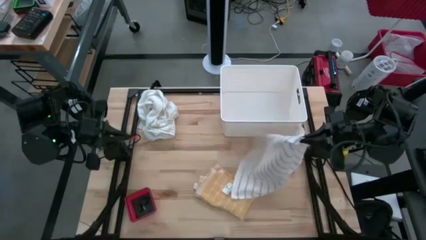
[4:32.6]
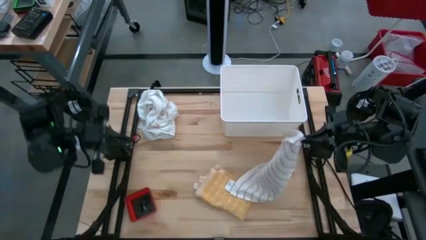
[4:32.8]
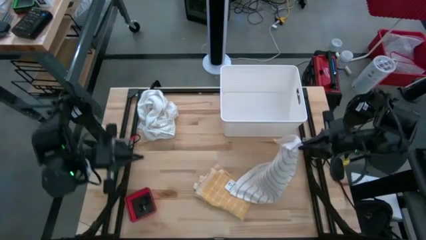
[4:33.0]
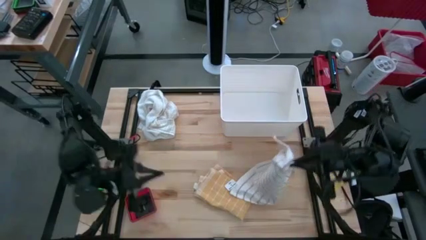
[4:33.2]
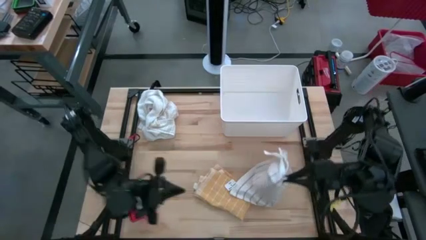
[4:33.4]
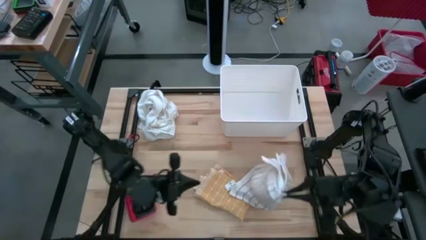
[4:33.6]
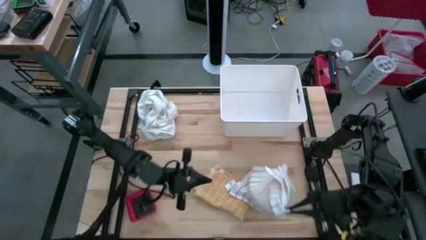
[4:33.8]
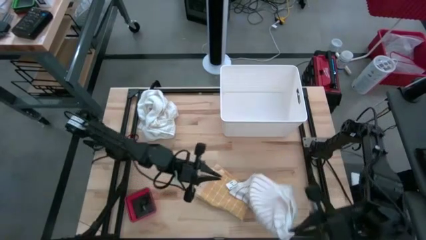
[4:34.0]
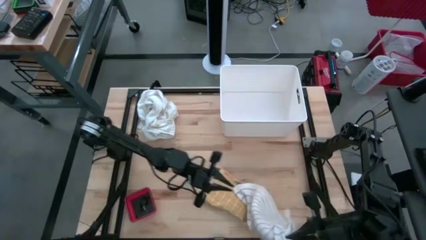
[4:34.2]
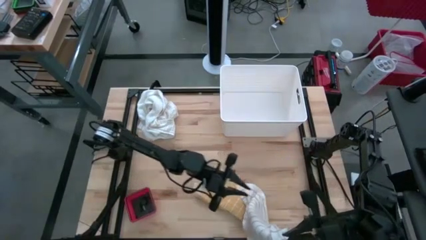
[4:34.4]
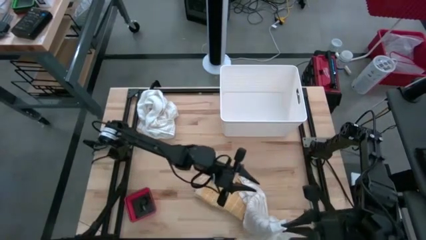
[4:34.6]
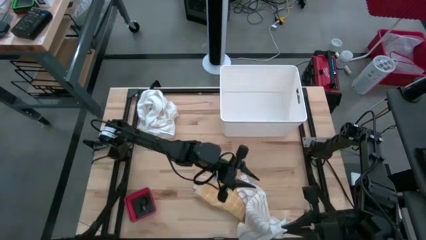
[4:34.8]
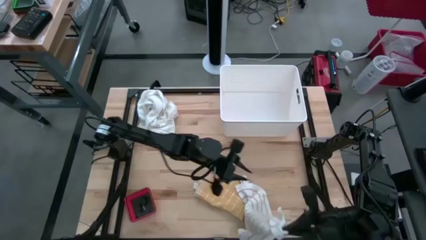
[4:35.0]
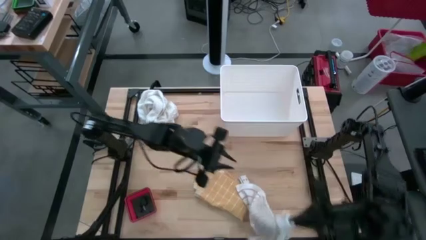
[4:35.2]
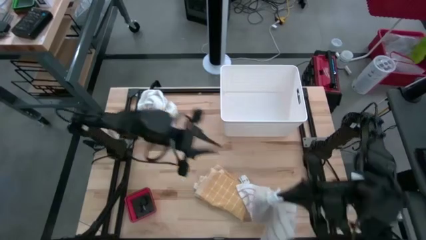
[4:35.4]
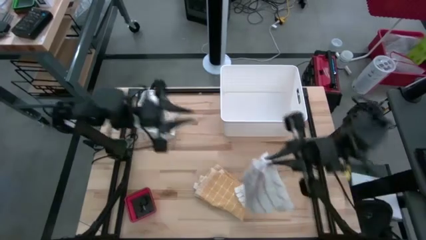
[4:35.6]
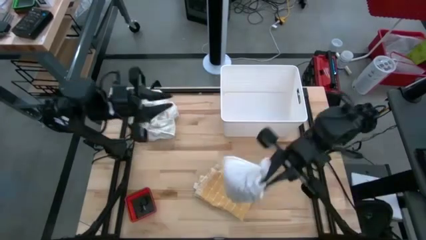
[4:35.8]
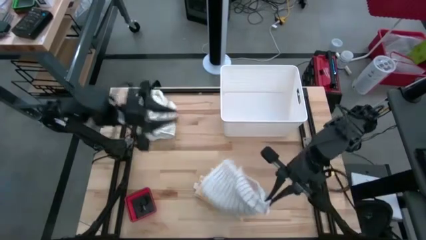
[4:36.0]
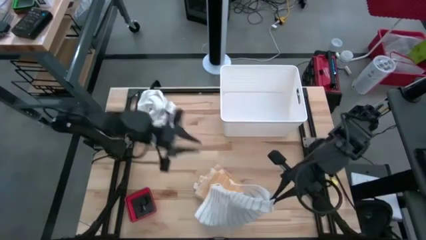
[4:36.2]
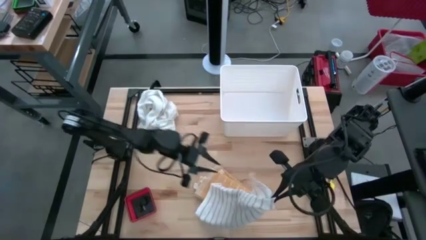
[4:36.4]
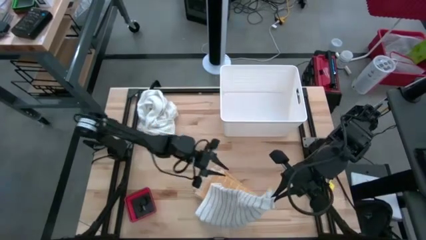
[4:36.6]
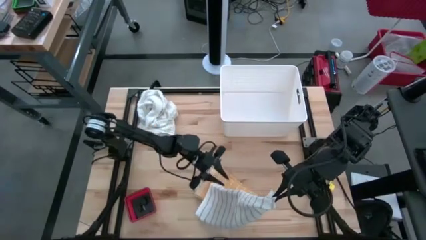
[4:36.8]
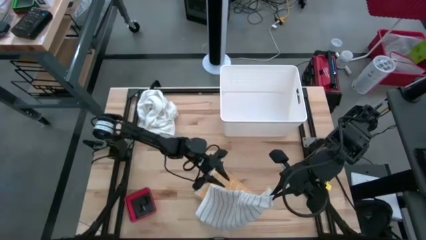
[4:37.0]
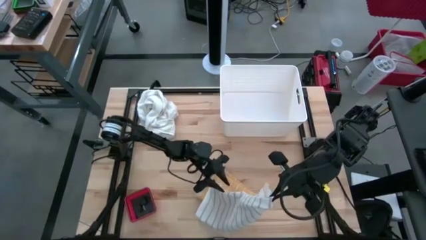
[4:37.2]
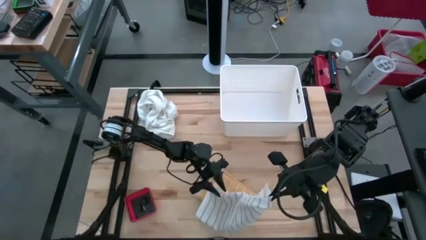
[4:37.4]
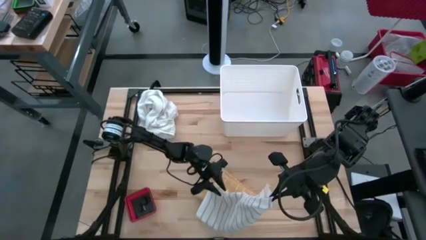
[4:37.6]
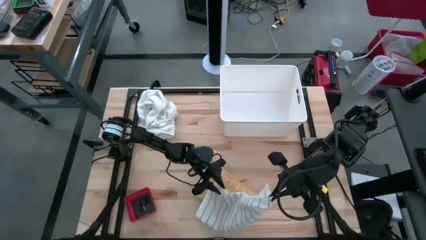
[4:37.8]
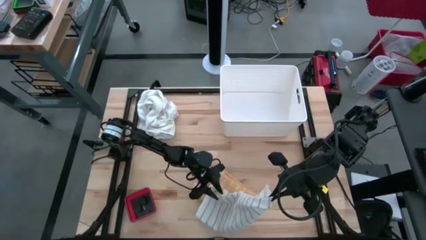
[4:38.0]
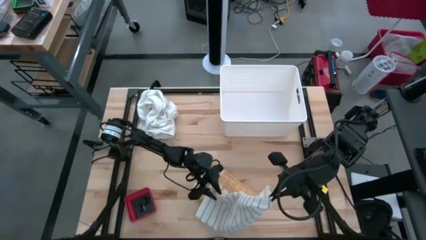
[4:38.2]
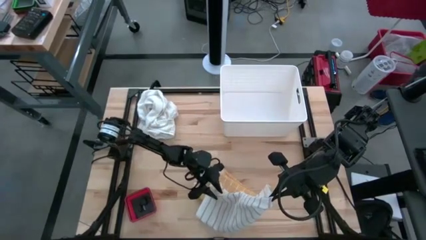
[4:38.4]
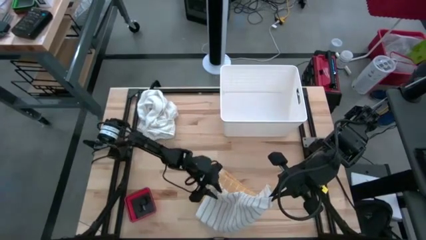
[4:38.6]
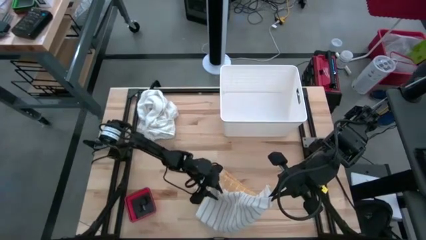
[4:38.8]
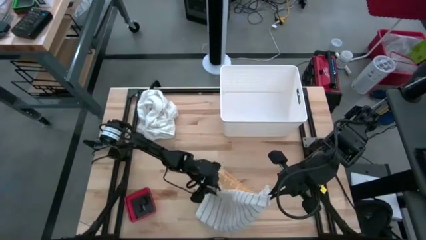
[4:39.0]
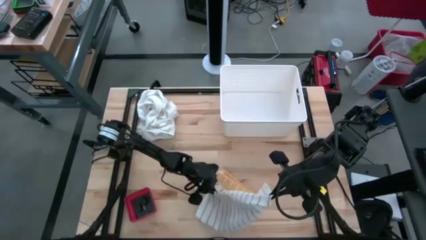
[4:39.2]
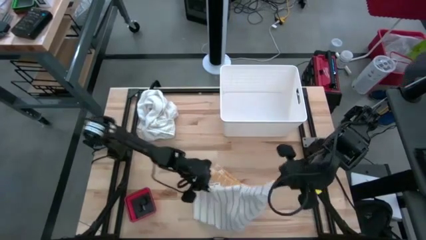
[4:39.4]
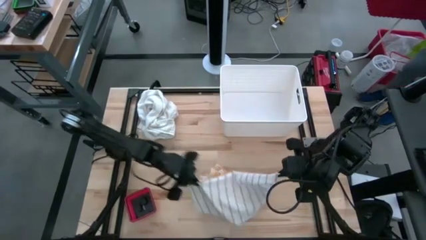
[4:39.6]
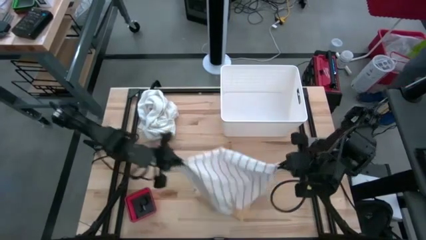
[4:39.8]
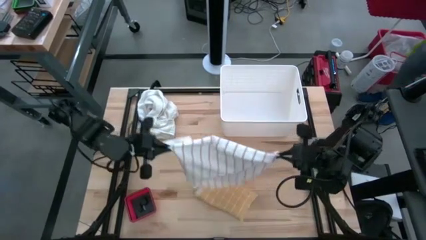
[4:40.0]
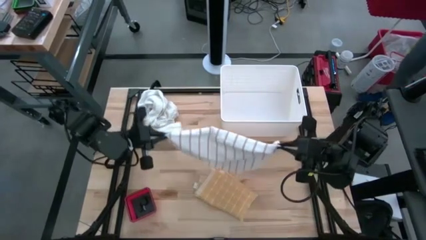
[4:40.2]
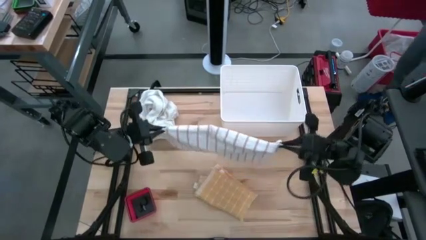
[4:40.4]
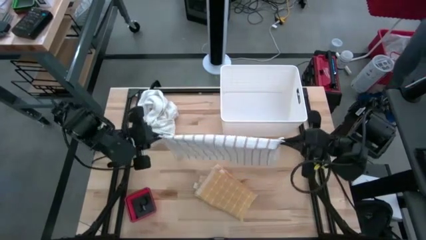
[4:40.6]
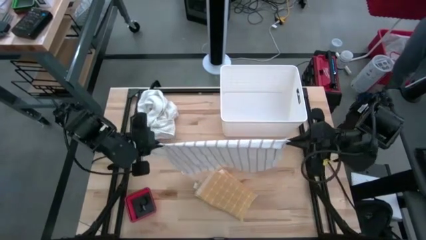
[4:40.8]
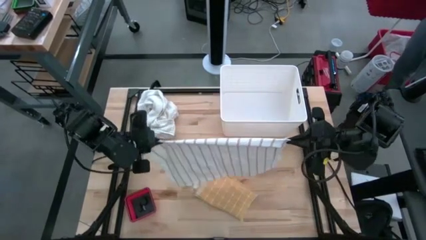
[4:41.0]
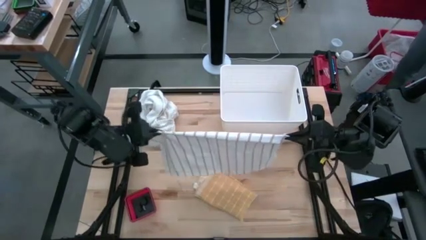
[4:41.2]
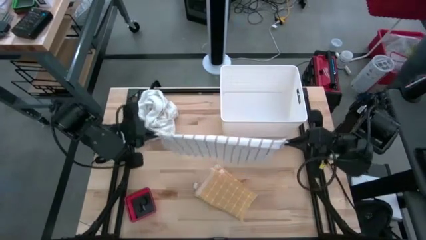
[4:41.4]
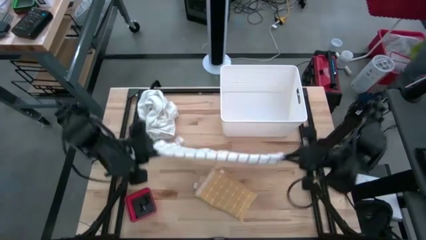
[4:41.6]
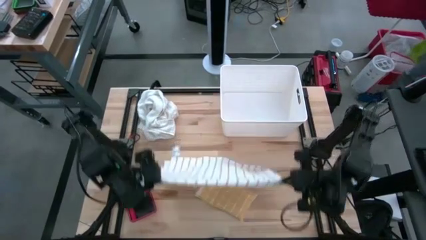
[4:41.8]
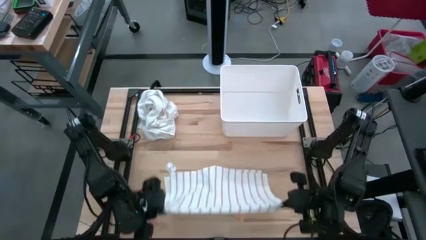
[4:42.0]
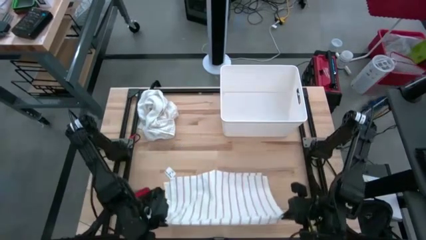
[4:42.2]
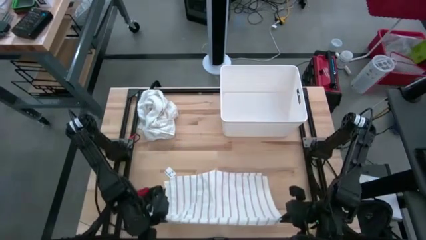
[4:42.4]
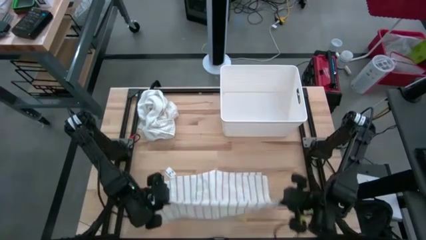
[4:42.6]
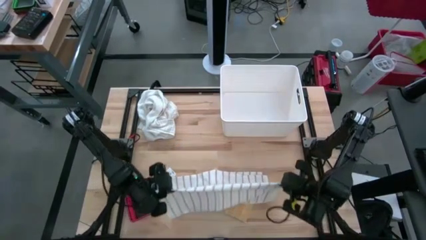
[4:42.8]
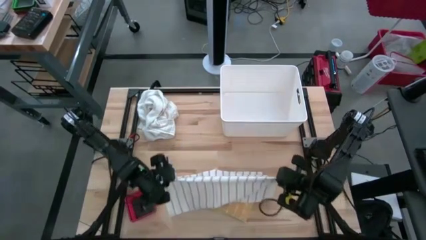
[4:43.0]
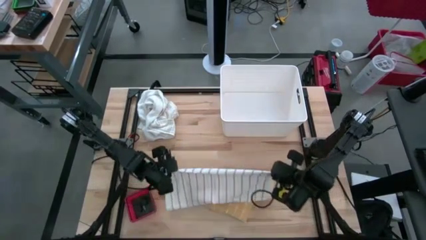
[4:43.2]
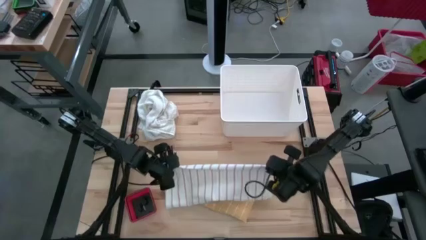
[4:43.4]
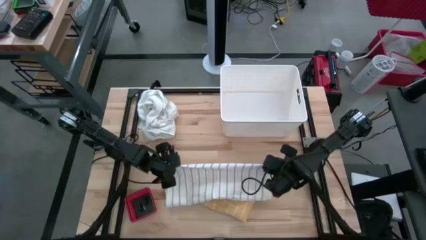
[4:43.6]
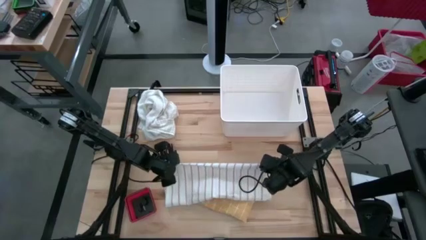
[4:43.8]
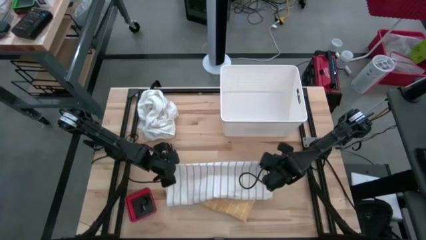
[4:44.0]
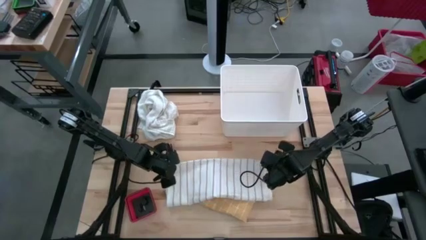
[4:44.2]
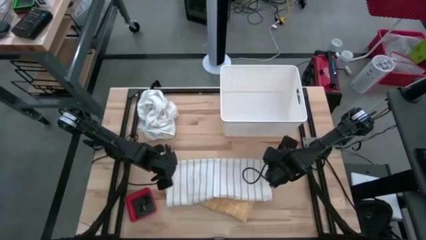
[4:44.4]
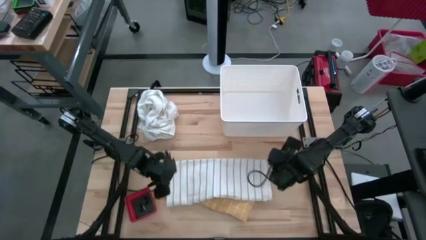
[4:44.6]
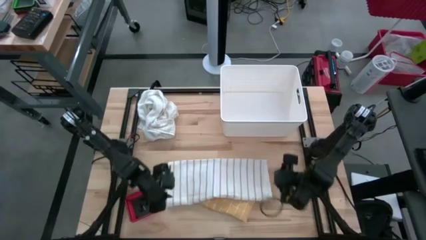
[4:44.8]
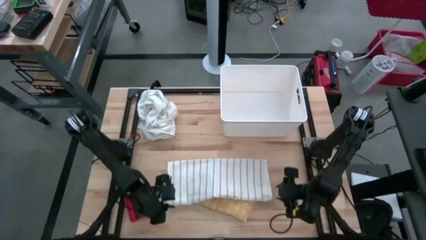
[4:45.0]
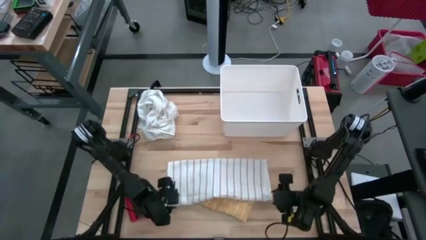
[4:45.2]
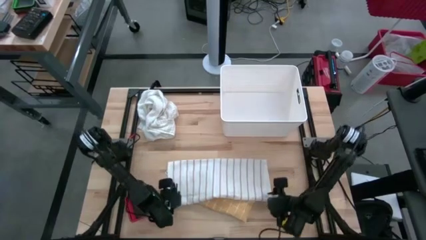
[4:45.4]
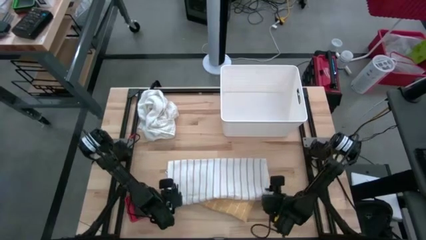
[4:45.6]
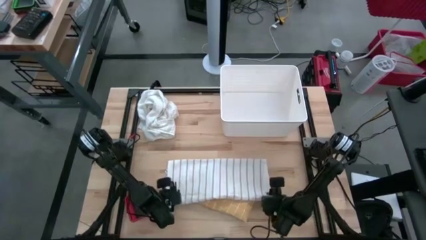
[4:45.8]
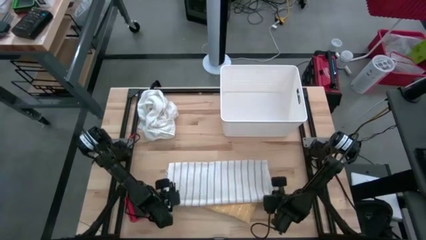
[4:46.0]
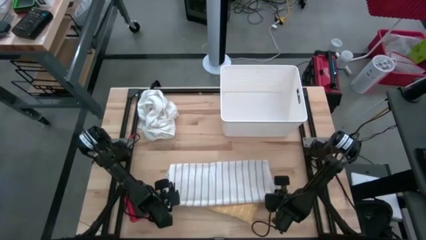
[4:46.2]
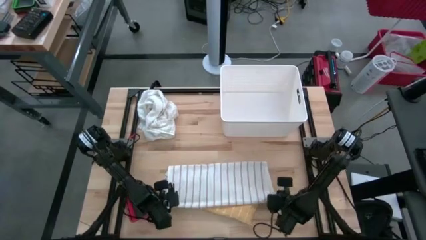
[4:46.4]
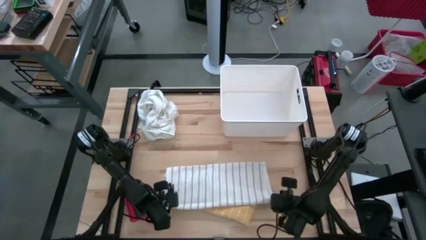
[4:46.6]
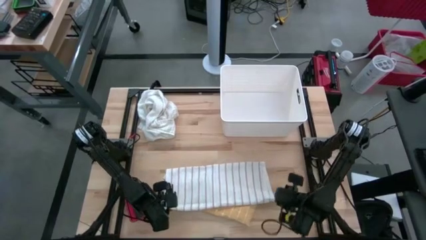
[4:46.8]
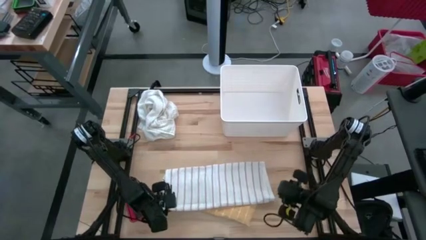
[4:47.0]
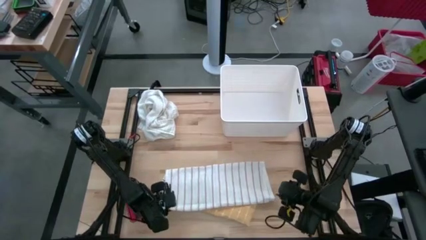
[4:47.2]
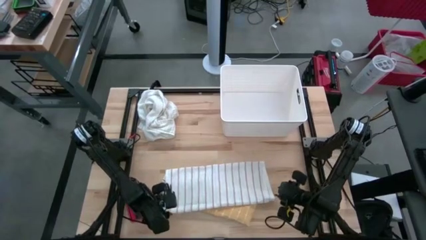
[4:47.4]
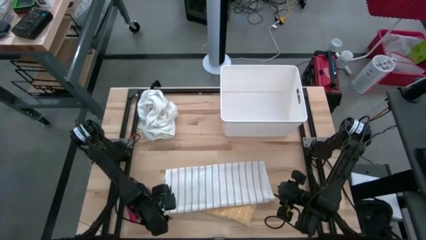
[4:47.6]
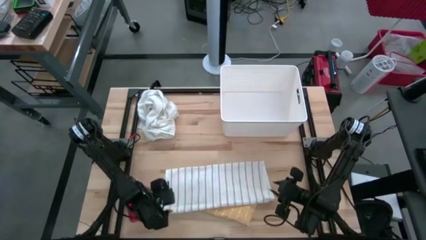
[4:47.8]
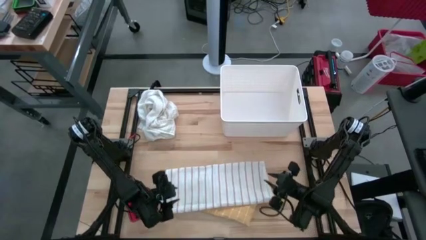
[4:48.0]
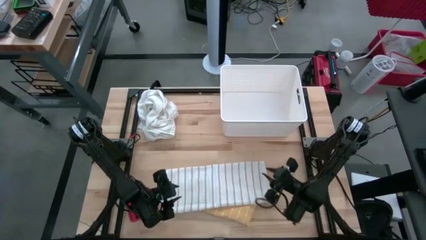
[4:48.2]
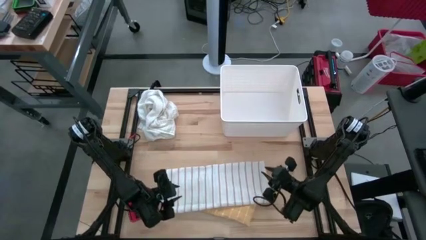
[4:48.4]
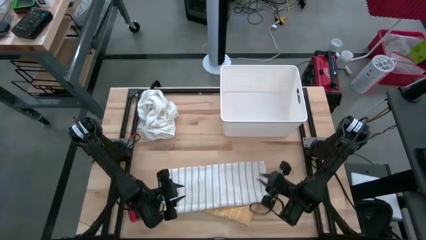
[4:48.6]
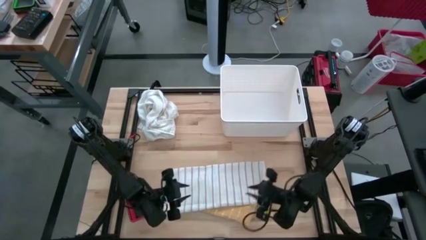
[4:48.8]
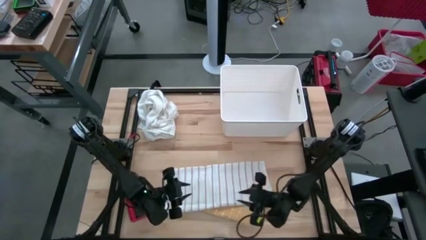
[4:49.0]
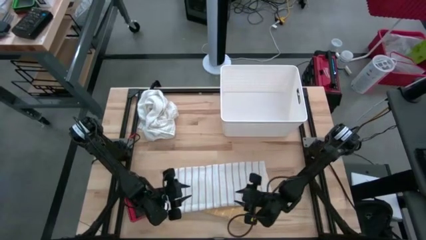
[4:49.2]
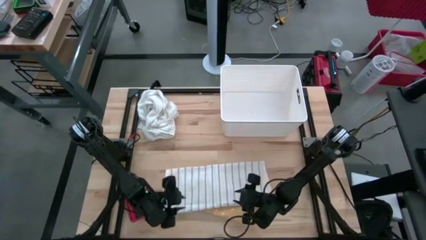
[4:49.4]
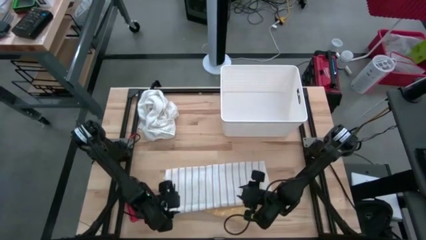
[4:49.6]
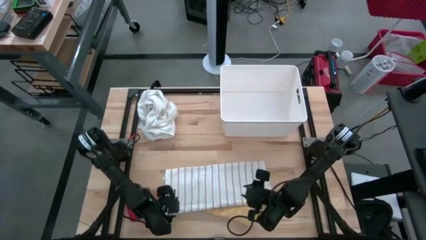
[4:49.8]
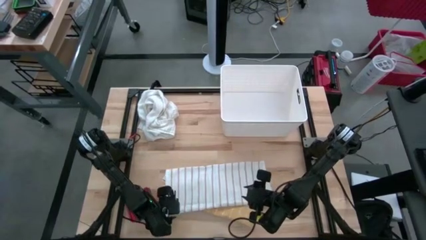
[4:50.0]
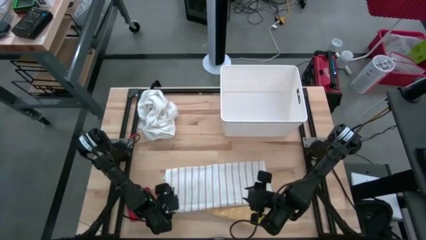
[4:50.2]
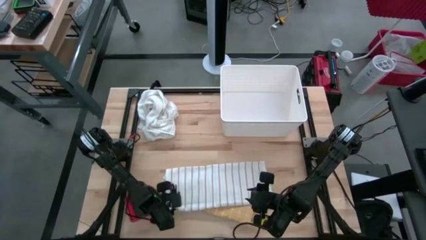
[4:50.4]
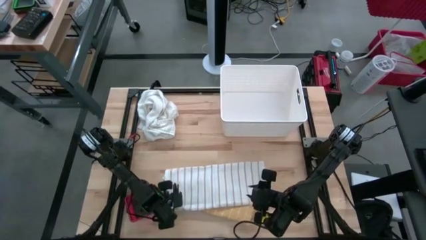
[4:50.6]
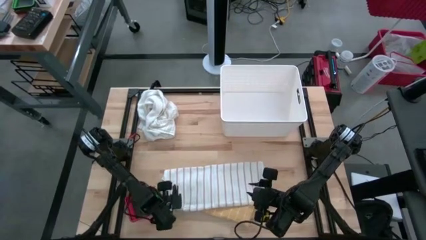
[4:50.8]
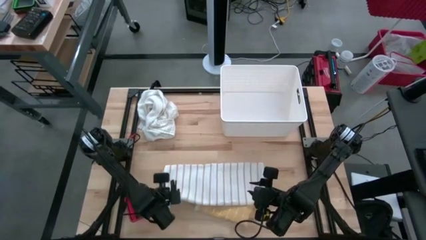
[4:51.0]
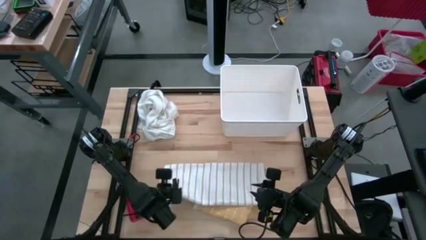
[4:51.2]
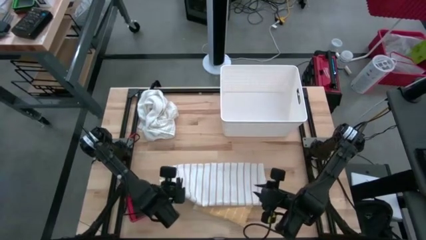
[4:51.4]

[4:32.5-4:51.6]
Task: Fold towel
Fold the white kitchen towel
